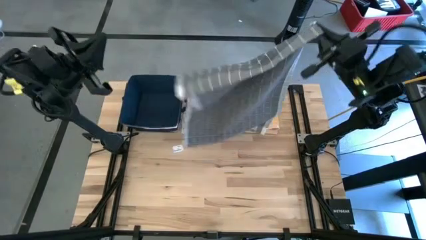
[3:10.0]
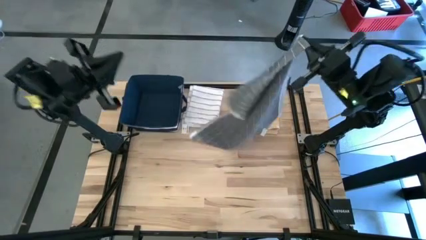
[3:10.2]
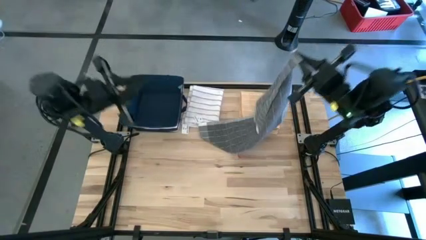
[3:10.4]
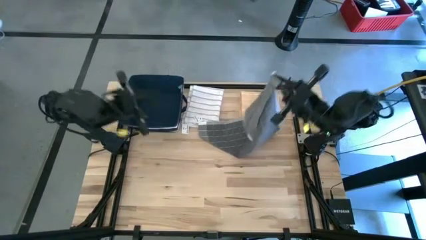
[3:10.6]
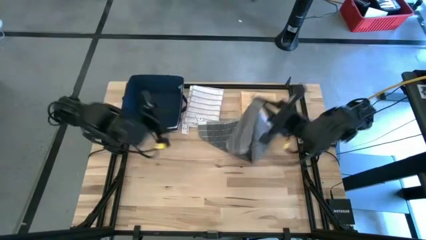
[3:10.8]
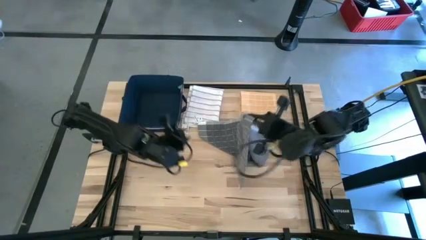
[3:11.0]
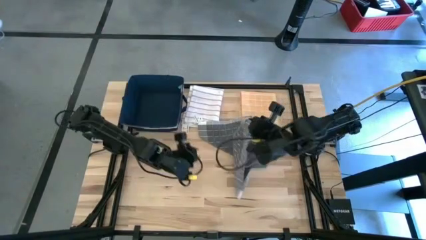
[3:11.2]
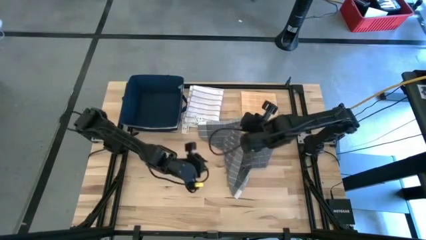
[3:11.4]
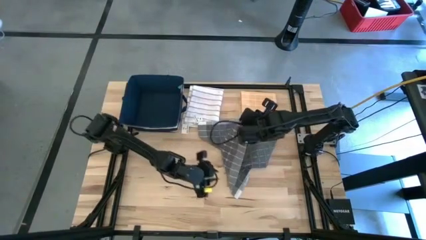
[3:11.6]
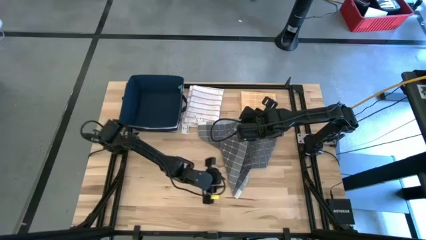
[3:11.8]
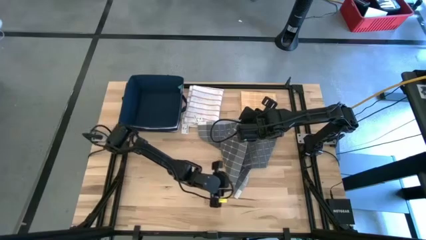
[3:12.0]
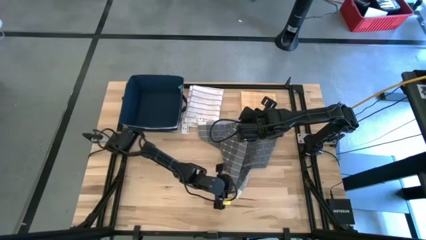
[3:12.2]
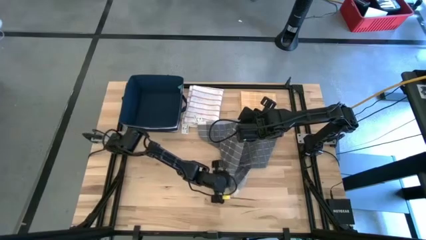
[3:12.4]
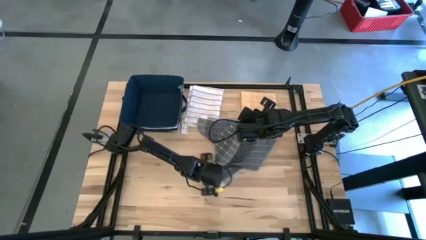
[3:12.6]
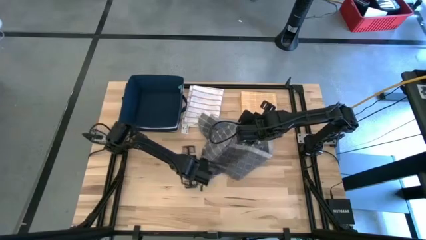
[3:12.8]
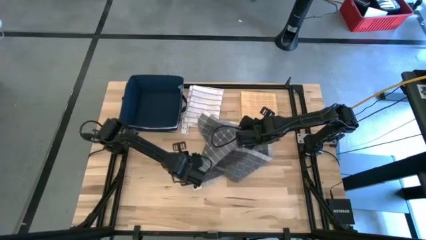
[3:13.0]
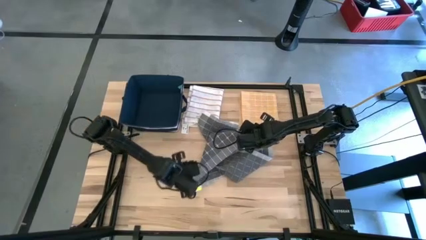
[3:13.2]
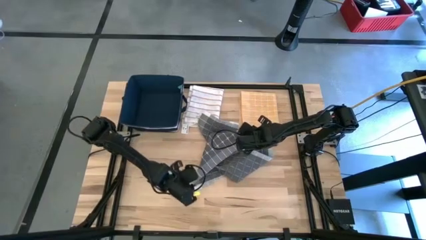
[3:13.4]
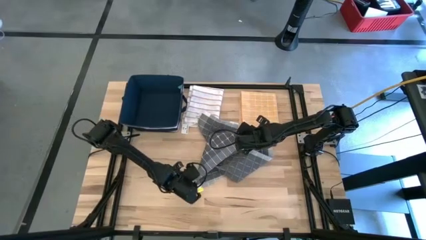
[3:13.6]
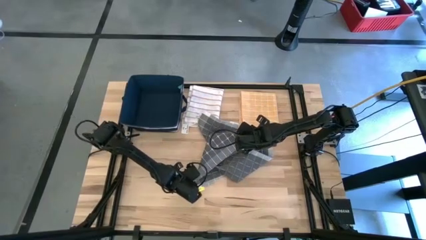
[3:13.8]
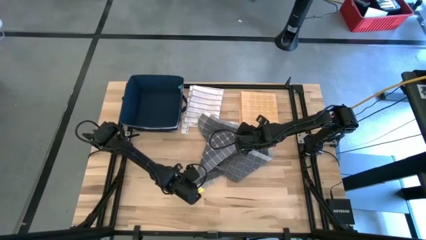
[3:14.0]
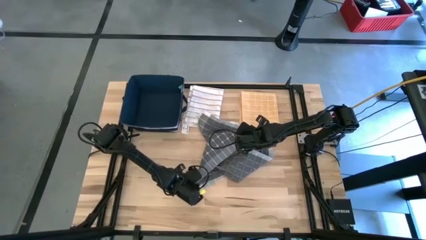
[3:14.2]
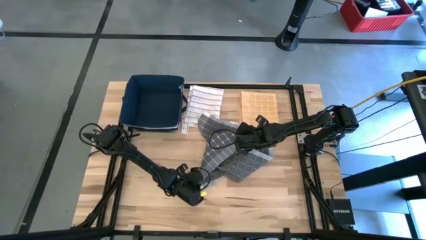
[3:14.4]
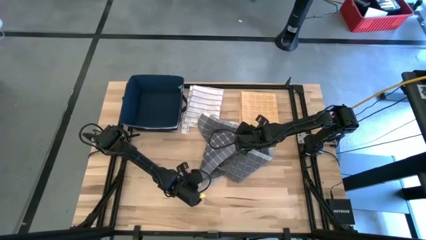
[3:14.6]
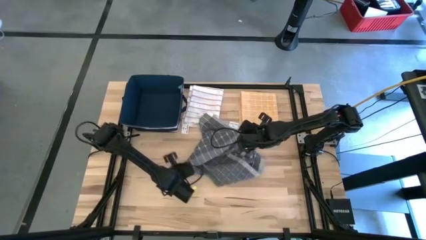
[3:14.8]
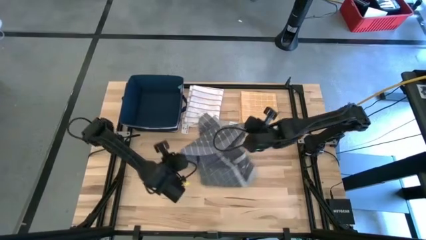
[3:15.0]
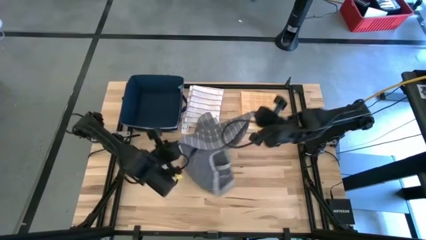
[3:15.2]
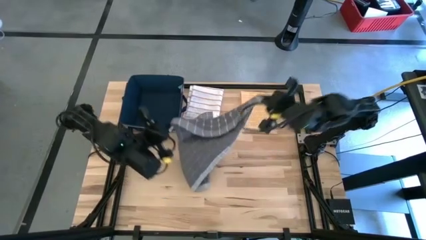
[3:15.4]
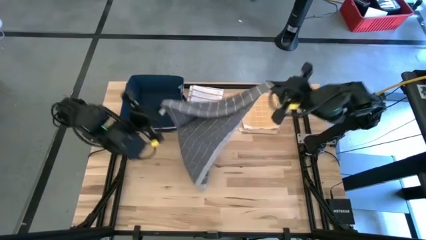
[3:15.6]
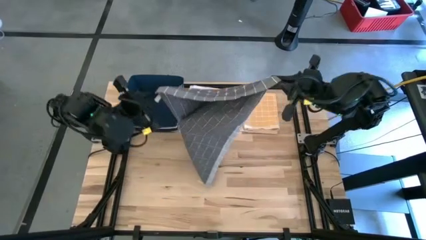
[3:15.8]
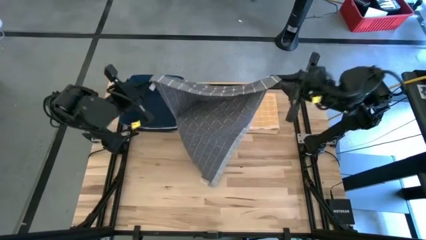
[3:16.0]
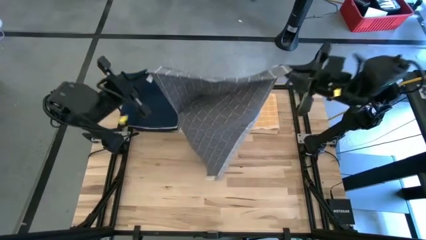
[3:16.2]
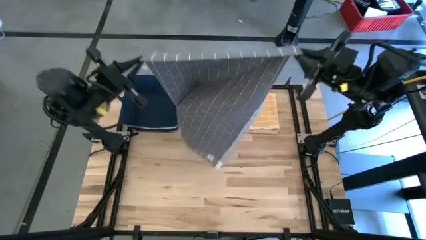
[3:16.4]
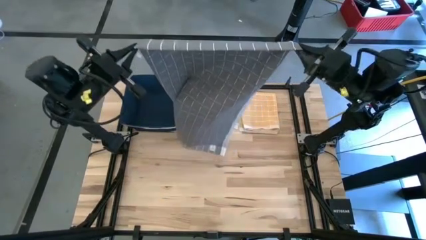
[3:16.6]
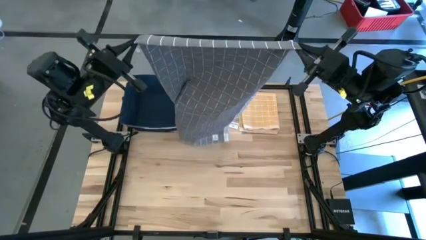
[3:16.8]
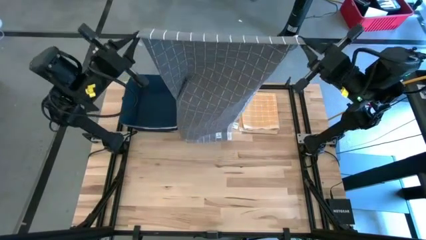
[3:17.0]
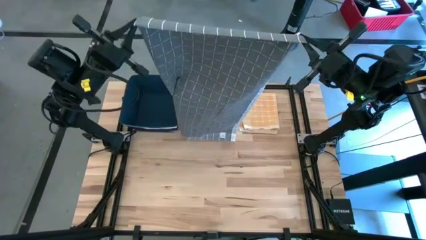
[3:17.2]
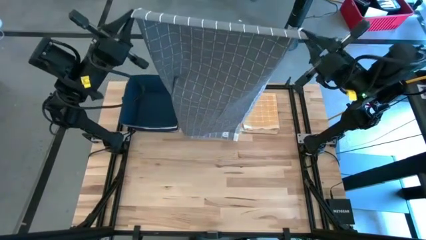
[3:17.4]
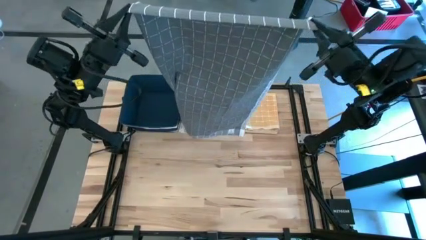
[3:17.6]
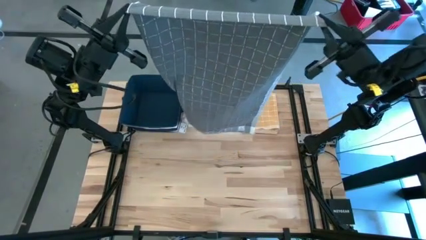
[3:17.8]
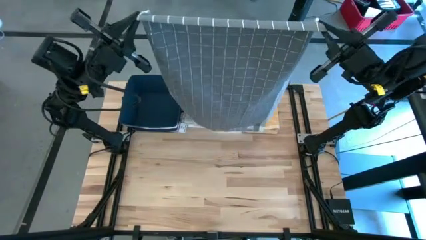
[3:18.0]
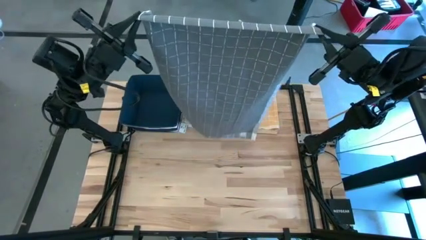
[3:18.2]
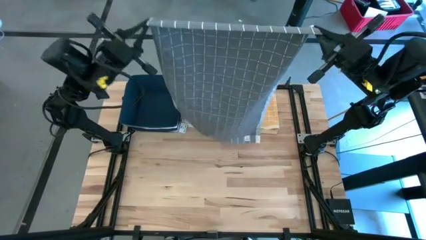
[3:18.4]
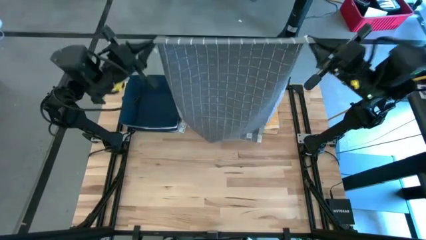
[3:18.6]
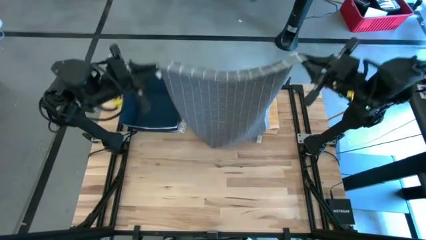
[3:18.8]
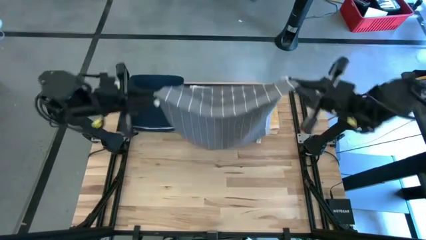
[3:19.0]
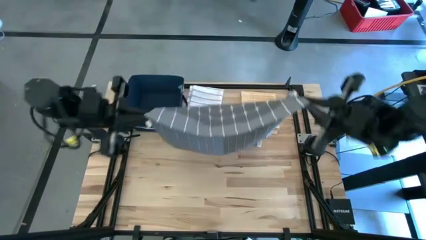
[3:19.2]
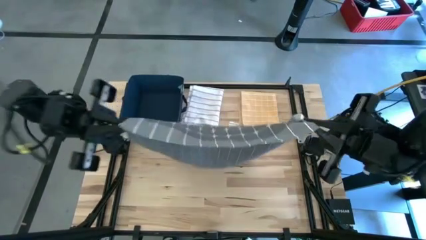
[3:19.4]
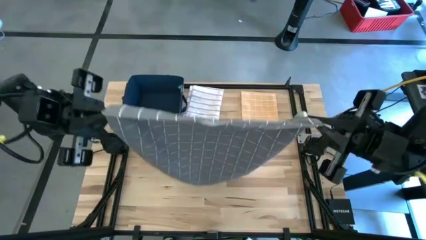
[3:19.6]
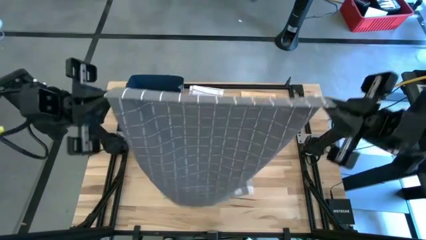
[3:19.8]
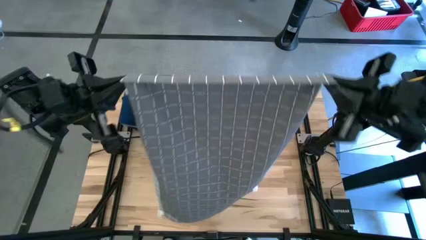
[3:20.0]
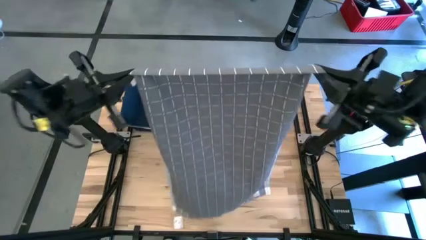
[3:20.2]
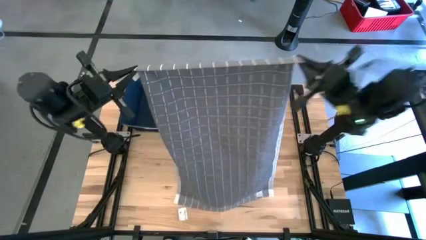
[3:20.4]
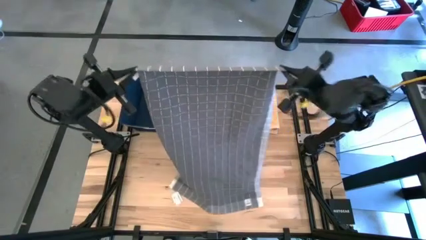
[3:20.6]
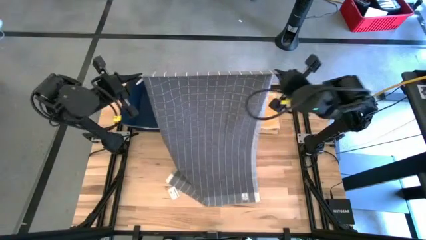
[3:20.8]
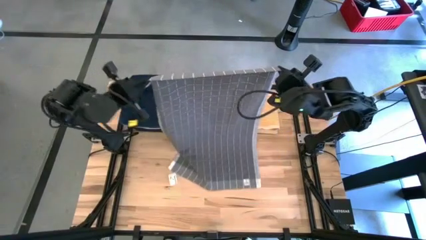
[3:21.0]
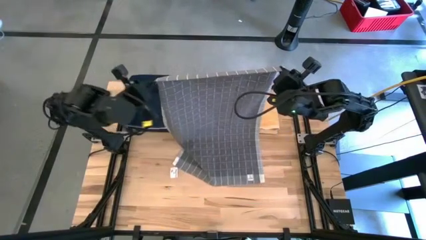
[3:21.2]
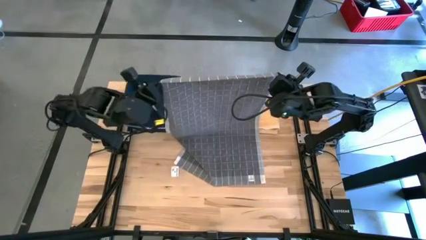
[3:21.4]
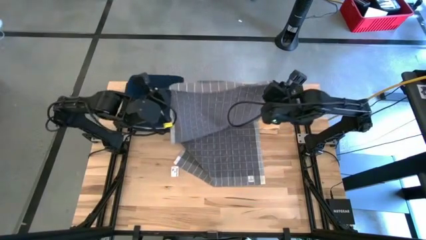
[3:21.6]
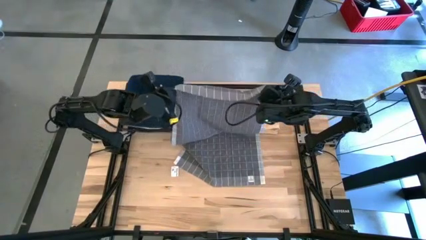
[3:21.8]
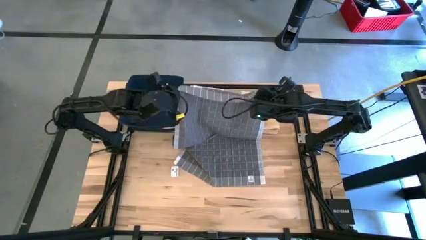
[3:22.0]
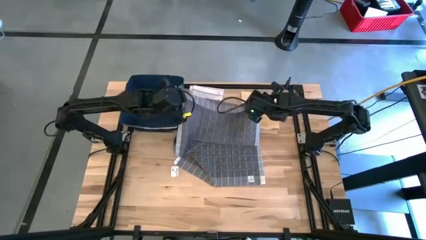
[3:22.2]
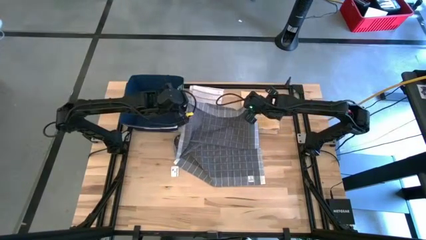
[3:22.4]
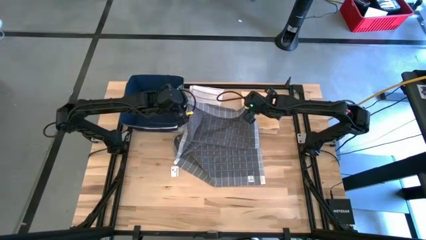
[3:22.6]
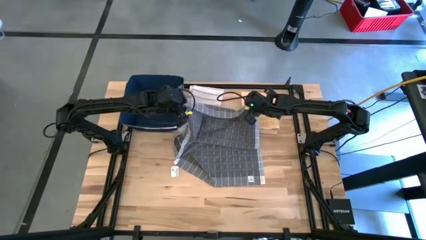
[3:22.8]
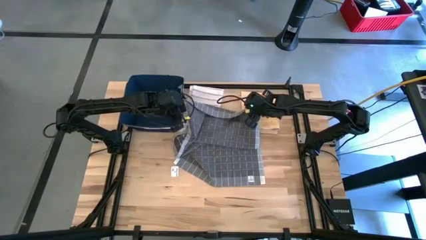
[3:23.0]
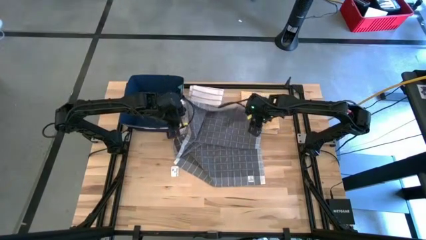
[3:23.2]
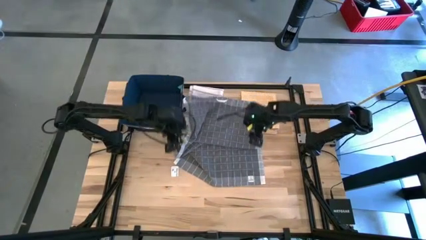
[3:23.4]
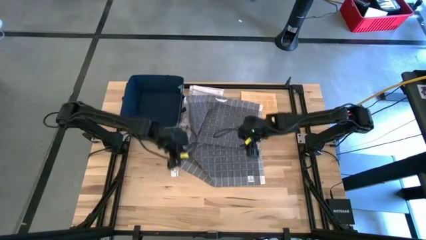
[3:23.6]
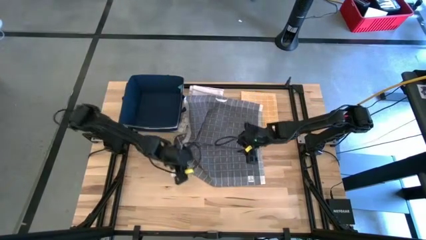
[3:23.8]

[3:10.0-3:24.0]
Task: Fold towel
Fold the gray towel

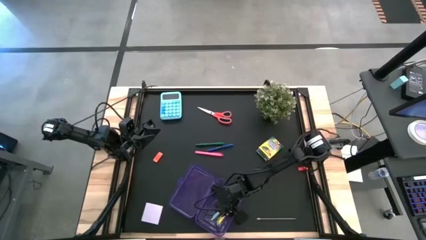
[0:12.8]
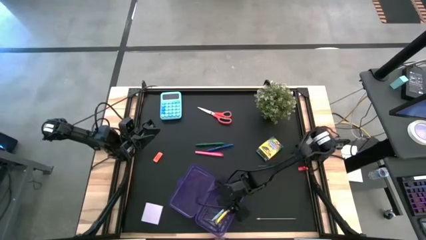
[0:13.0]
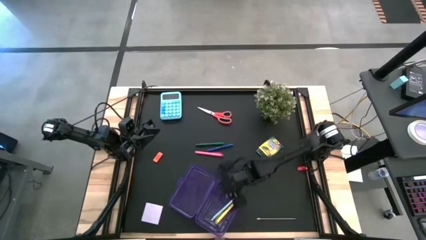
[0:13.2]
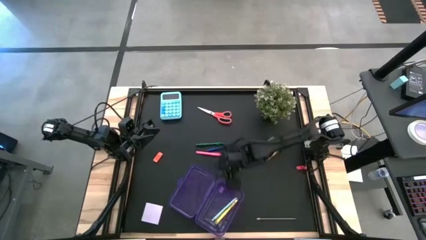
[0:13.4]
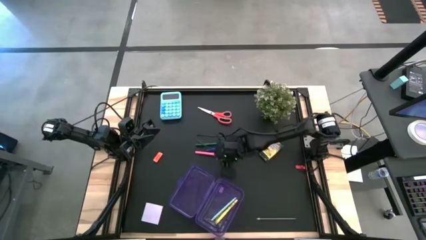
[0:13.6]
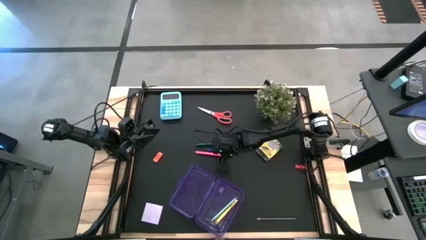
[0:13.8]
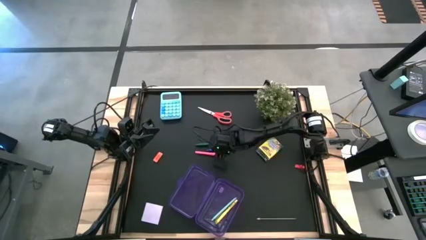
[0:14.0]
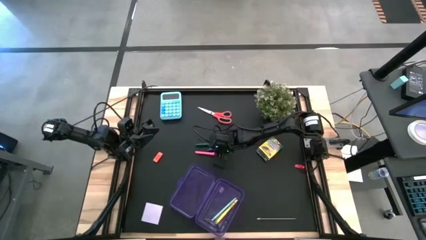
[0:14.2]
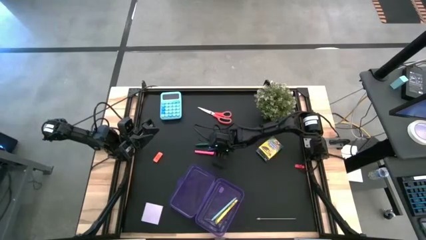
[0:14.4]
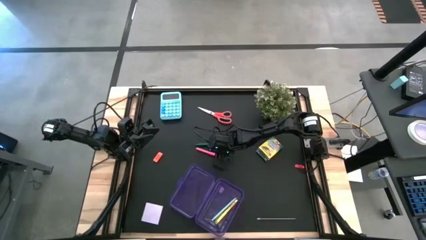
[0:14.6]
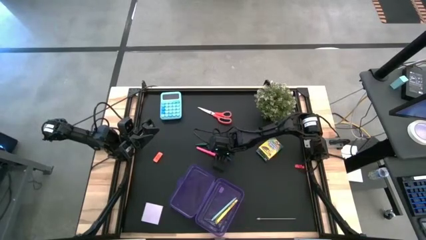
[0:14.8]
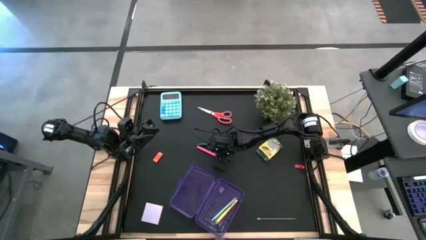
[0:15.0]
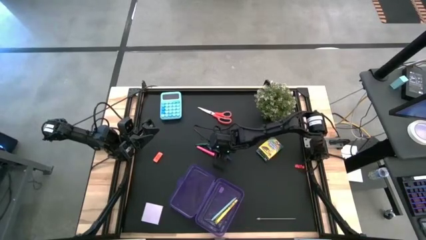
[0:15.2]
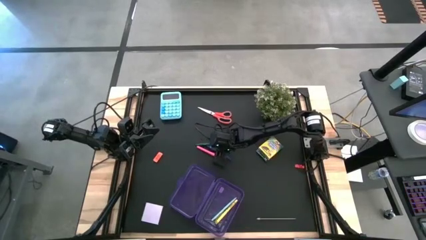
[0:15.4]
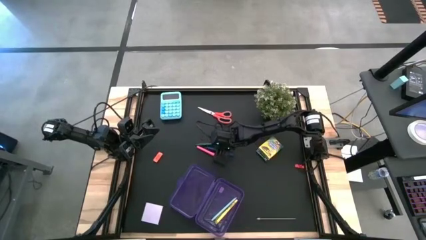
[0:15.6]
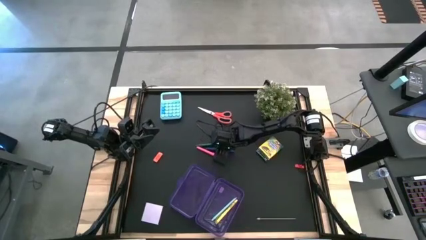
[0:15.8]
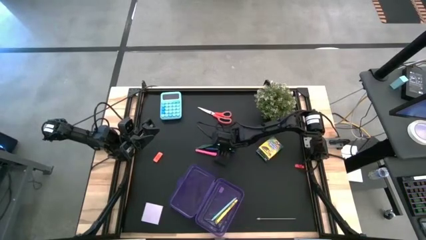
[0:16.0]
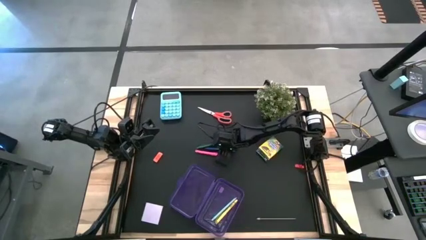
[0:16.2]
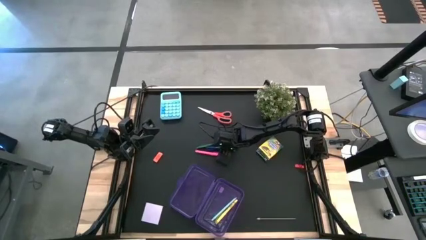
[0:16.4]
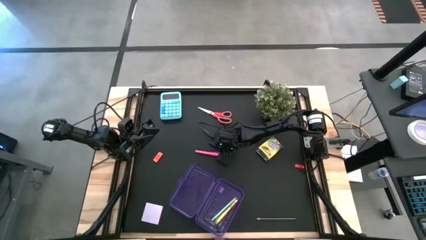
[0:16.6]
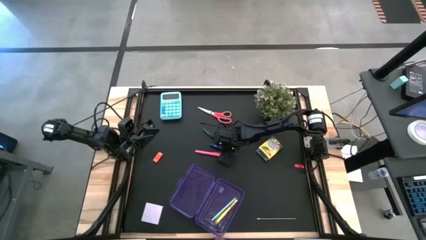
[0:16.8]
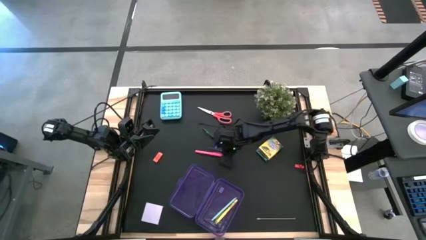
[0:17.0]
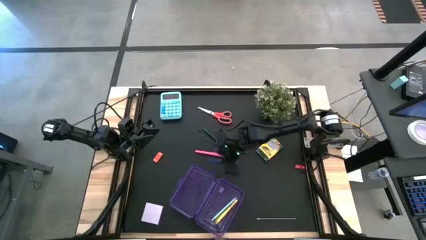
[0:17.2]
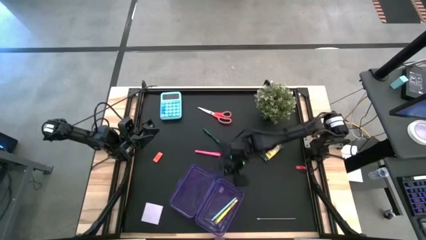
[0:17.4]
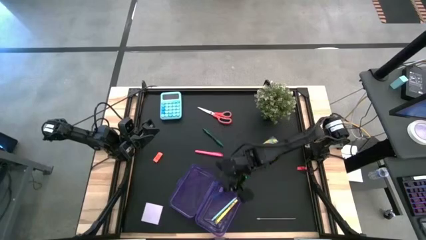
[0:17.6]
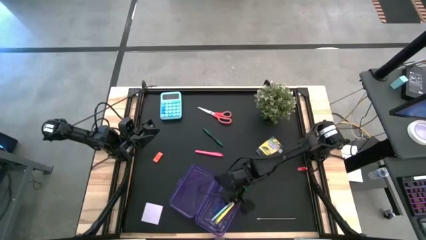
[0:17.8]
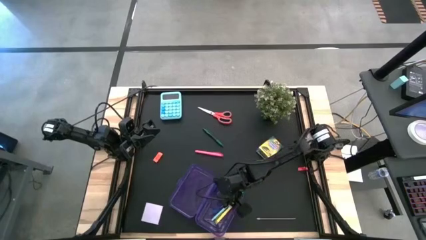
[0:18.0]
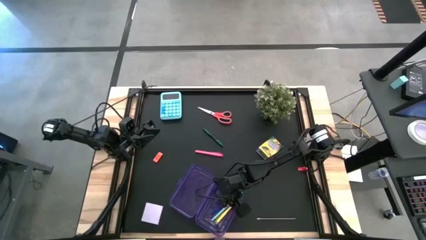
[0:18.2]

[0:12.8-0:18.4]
Task: Pack school essentials
Put the dark blue pen into the purple supply box
